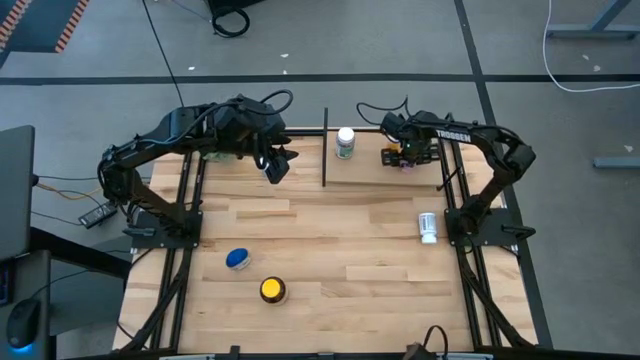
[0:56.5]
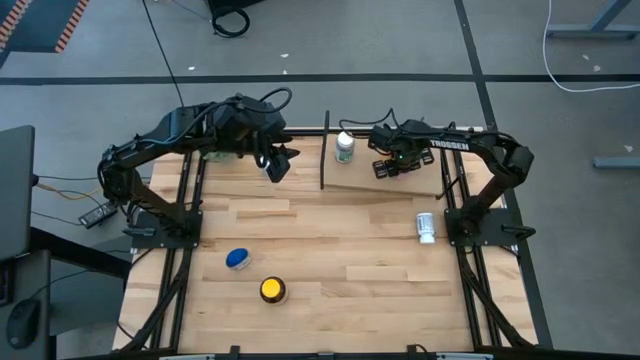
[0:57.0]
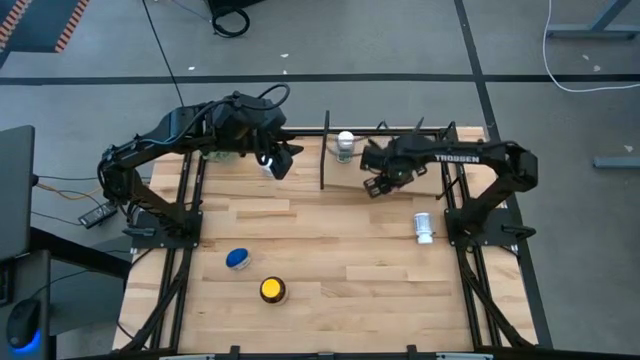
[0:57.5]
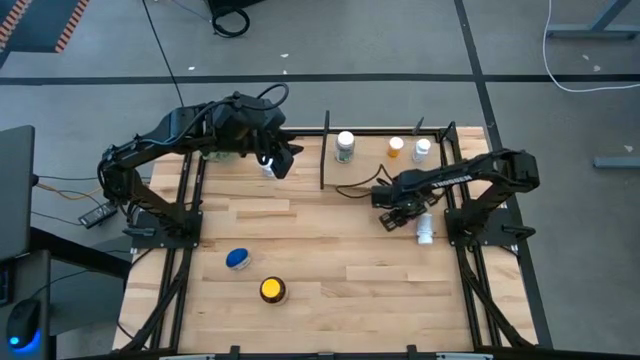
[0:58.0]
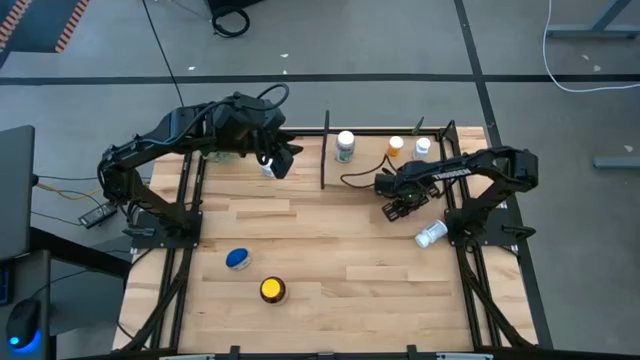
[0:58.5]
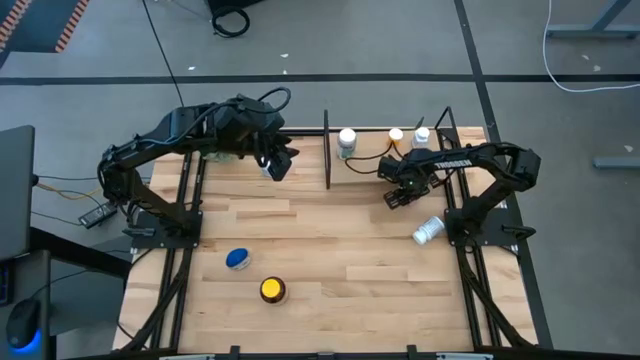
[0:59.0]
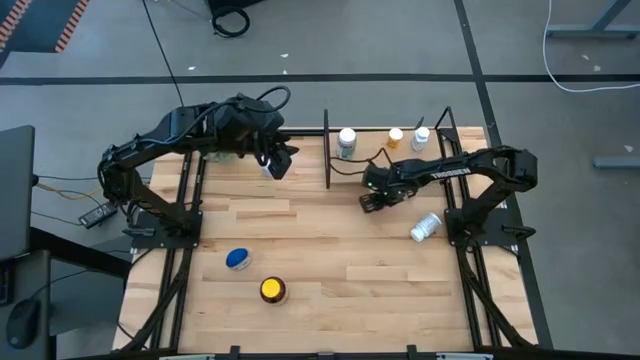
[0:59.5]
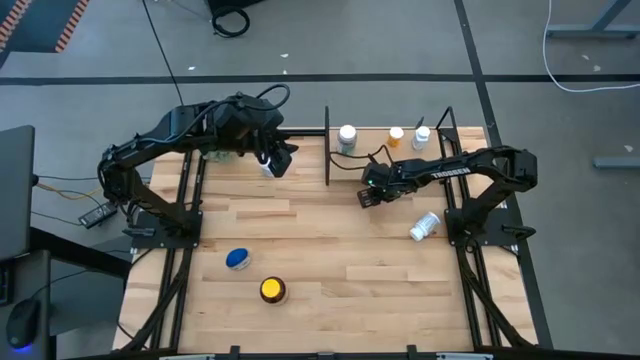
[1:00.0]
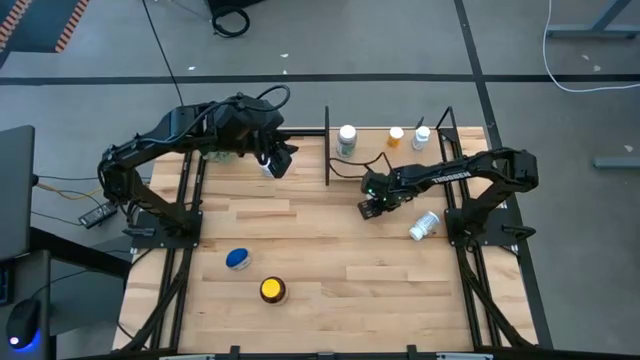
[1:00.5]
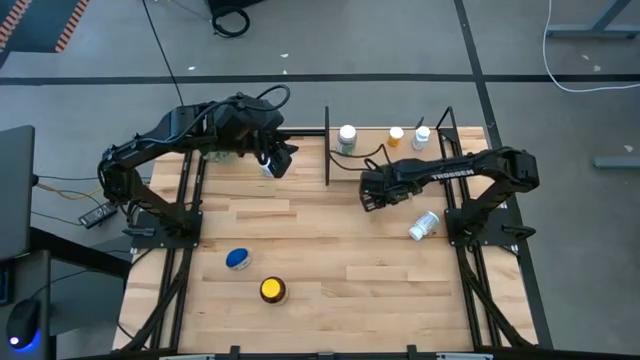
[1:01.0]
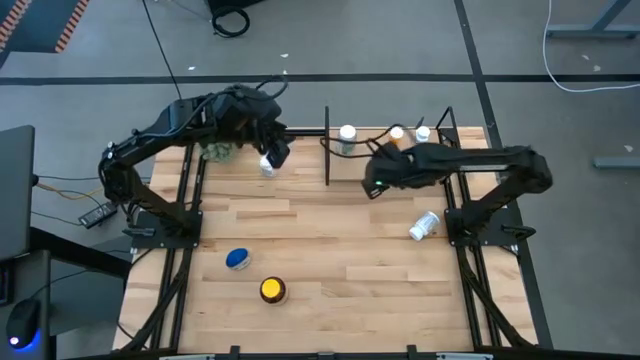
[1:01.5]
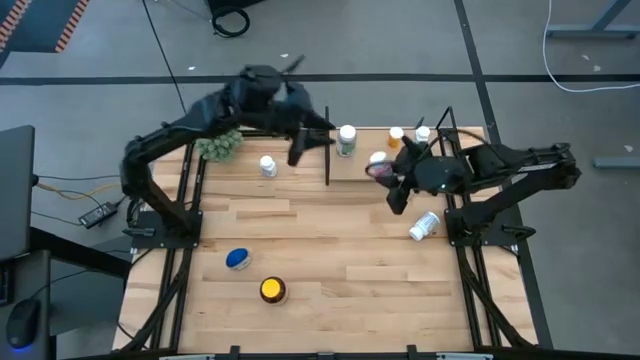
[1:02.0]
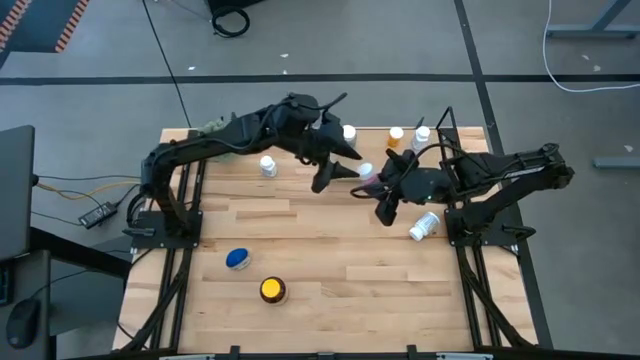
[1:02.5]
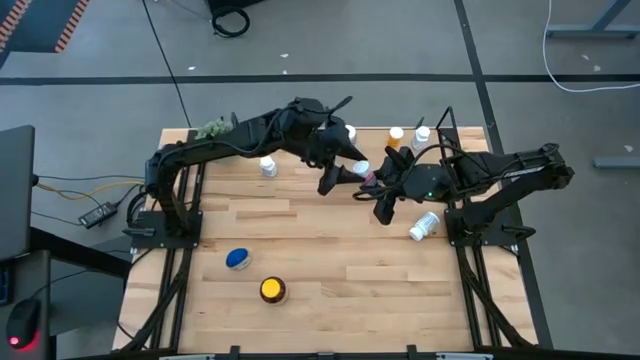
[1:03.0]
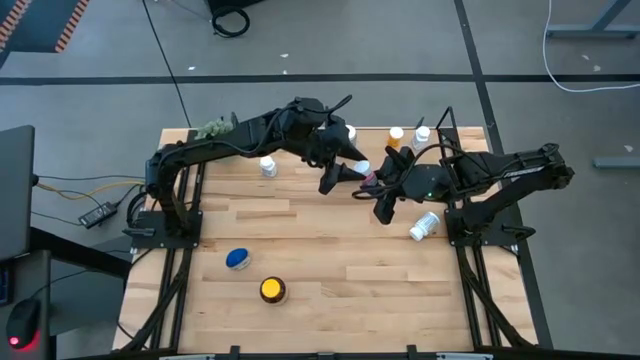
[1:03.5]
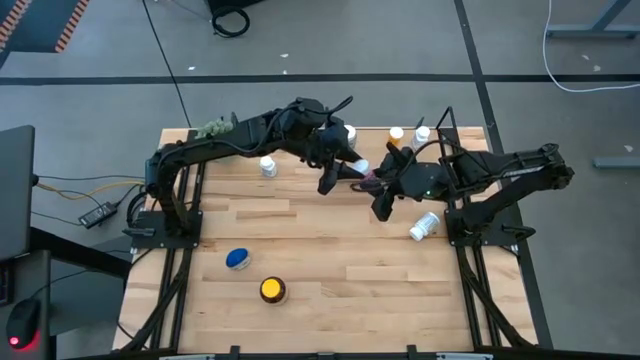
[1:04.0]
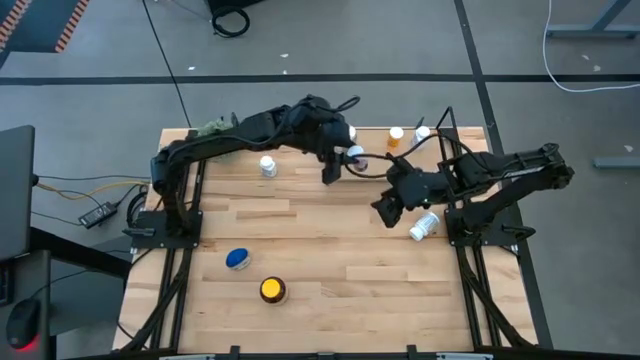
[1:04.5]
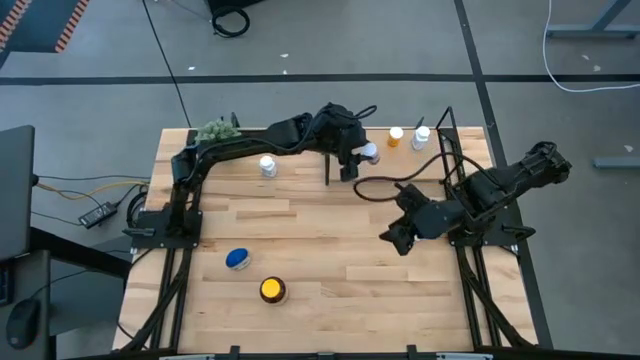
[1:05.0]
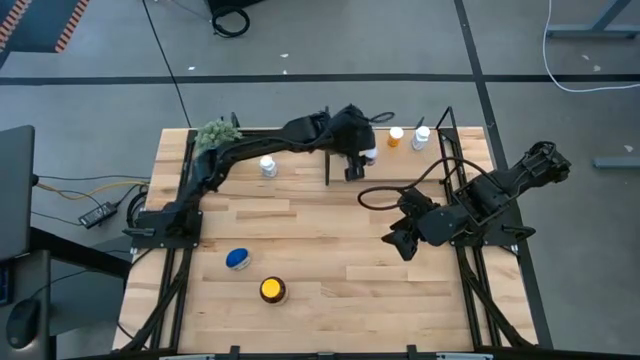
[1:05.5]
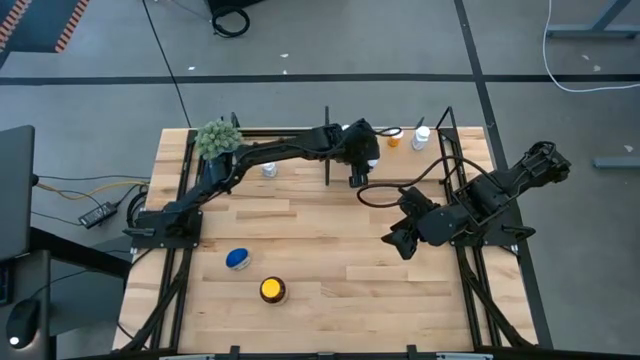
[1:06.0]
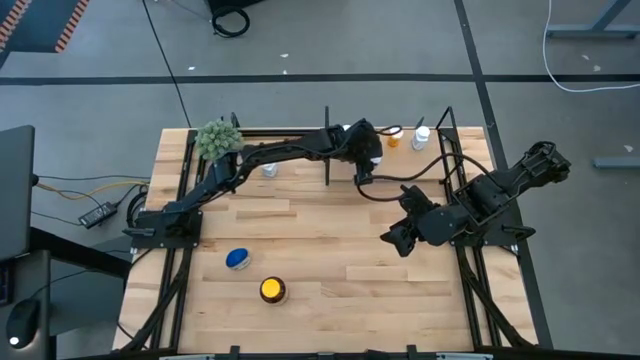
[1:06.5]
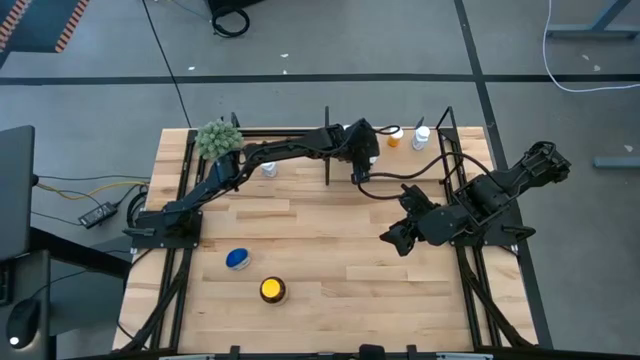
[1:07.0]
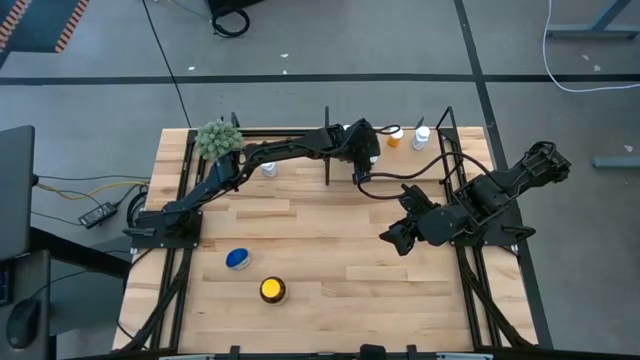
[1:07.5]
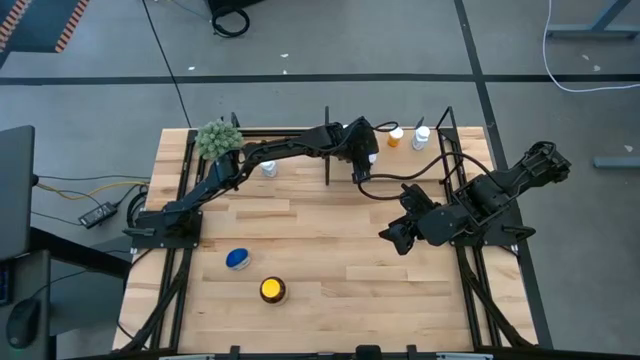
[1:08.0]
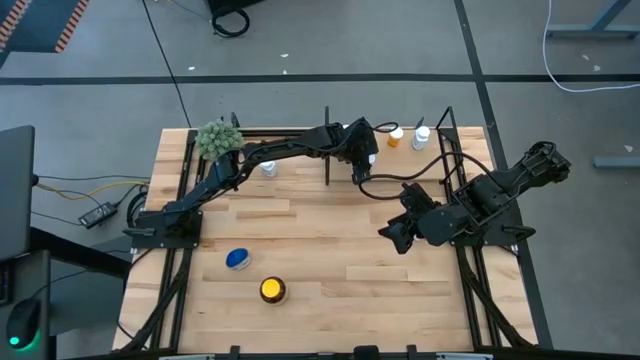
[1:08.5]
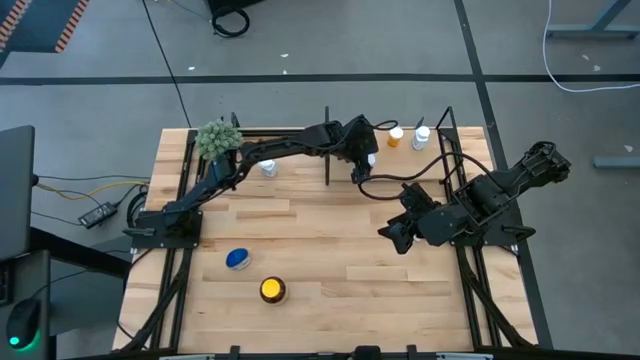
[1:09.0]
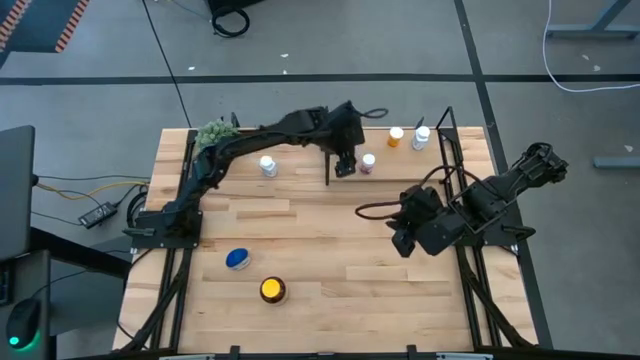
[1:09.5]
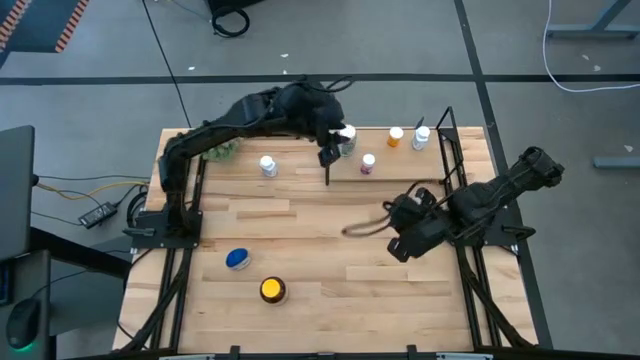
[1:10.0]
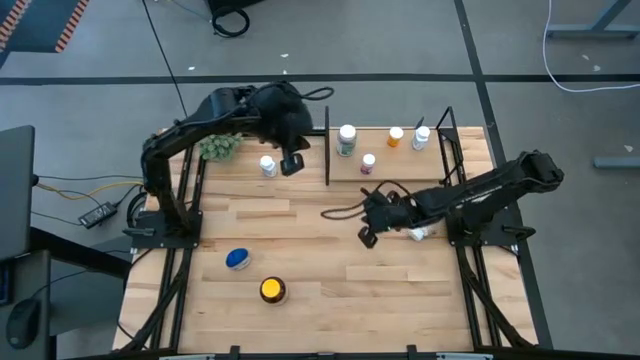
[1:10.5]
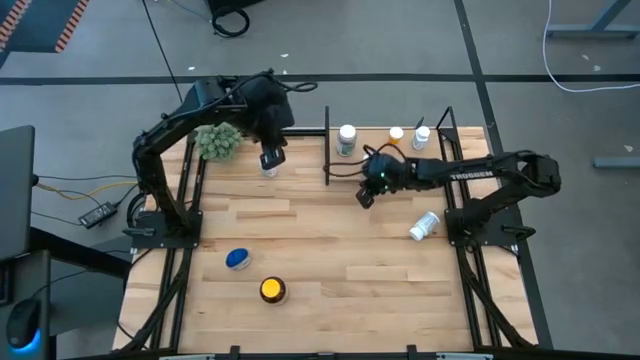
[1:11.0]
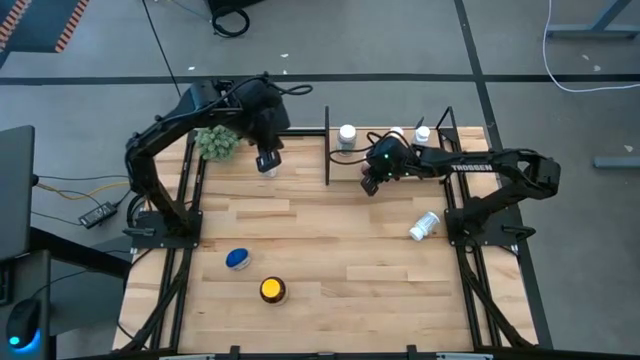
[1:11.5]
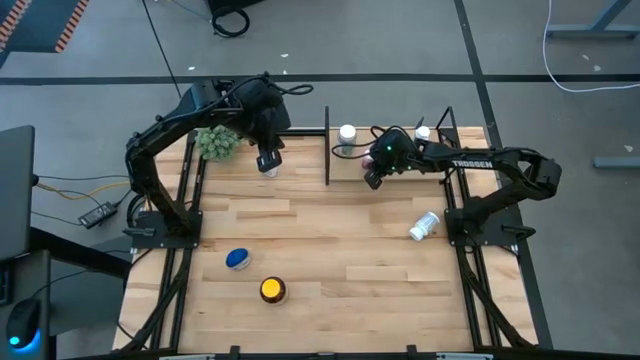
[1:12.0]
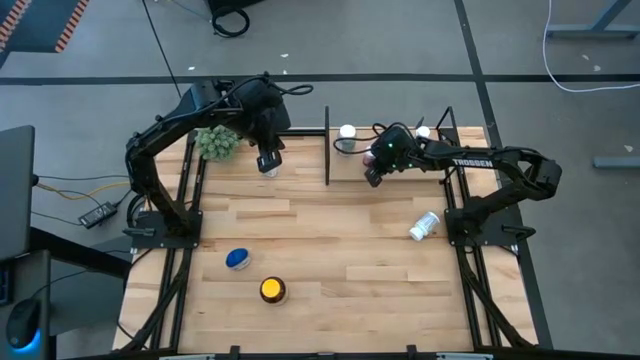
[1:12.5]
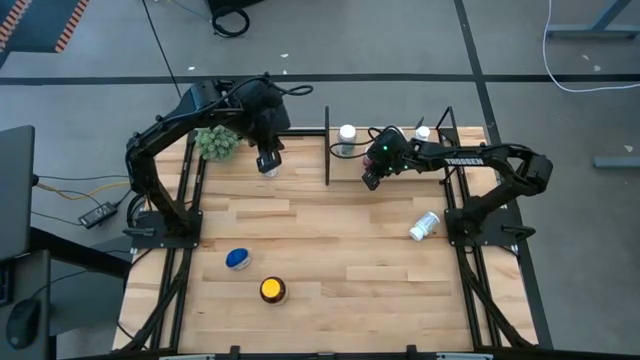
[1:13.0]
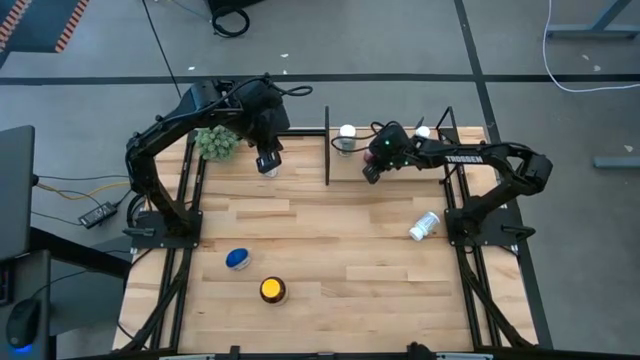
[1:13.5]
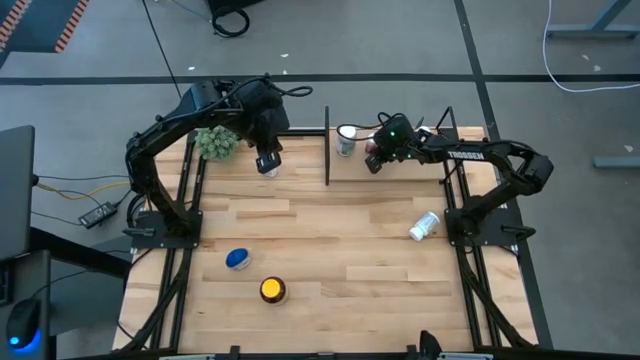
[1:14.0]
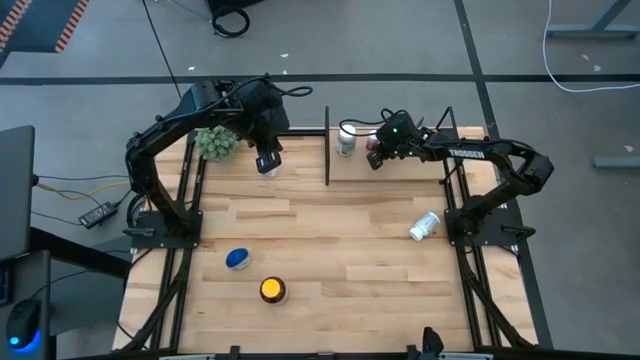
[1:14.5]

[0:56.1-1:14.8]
Task: Pick and place medicine bottles onto shelf by color
Put the pink pill bottle on the shelf

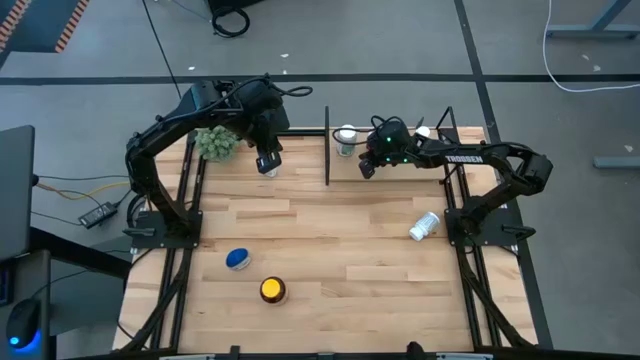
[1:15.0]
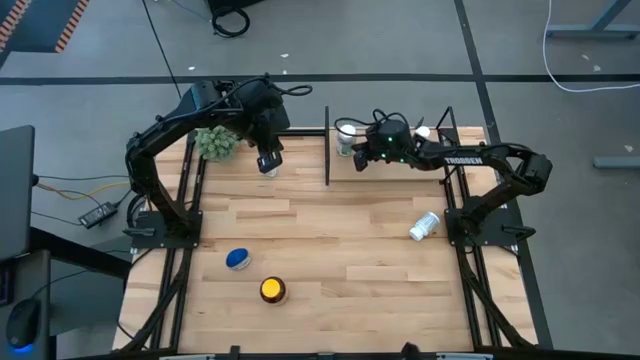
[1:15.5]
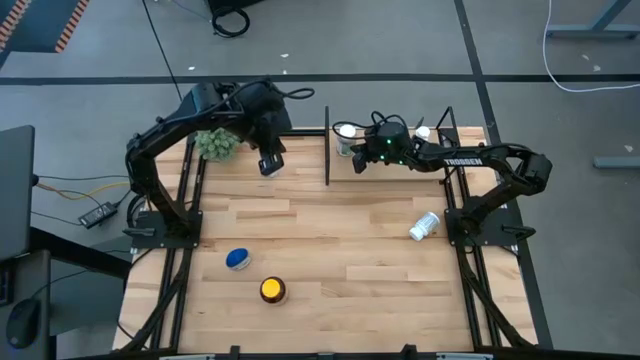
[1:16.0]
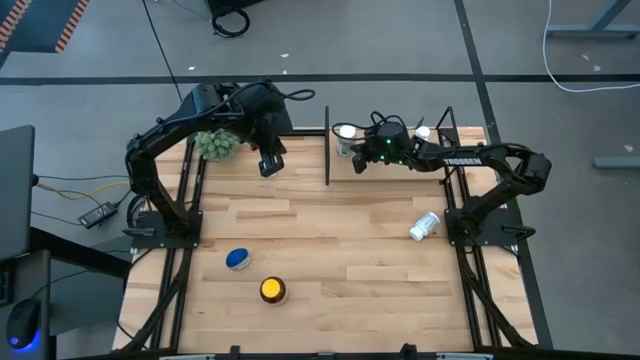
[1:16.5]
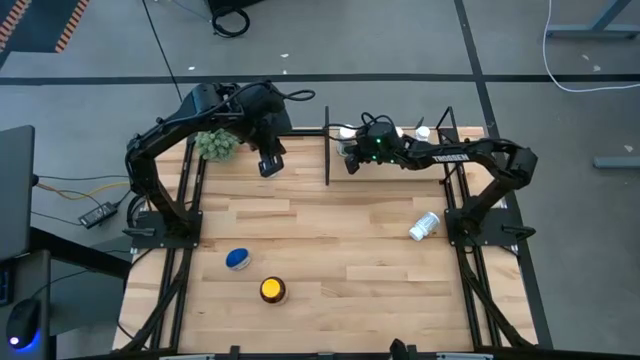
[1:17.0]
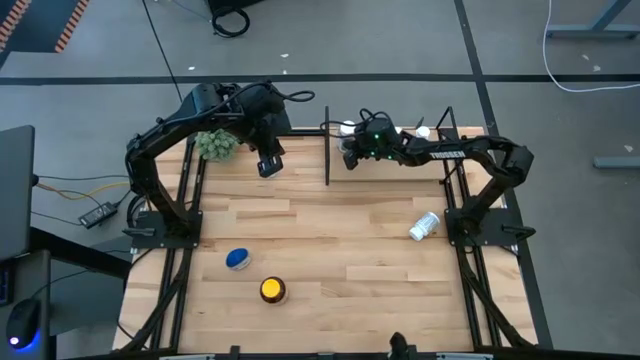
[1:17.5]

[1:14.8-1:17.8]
Adjust the green pill bottle on the shelf
